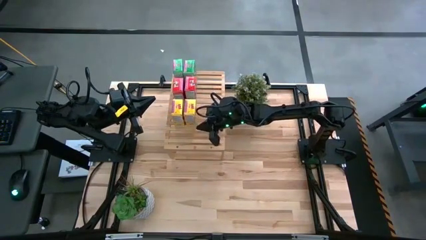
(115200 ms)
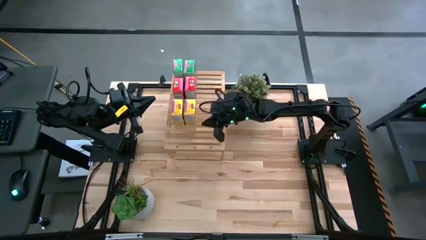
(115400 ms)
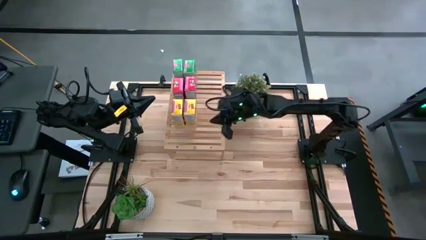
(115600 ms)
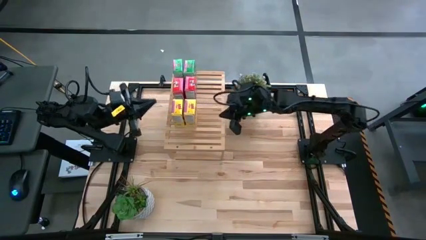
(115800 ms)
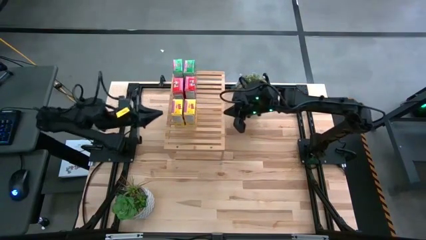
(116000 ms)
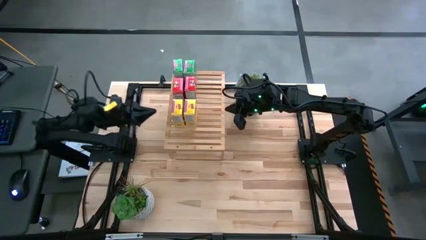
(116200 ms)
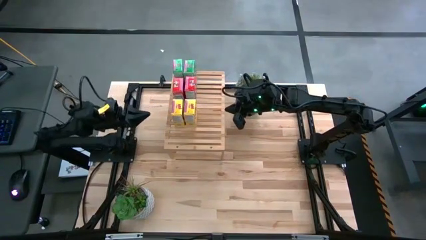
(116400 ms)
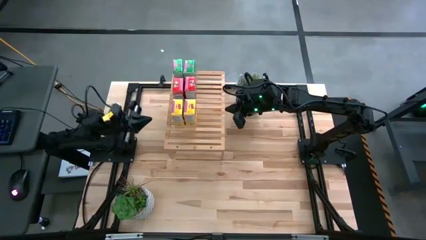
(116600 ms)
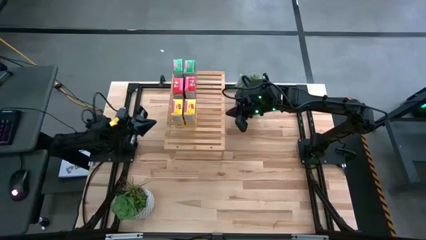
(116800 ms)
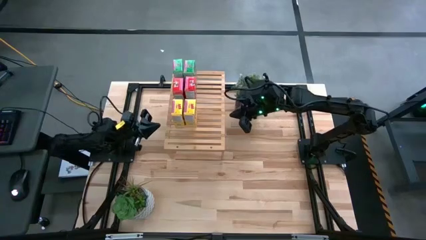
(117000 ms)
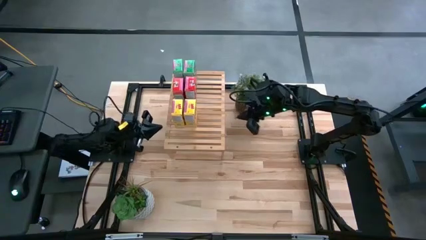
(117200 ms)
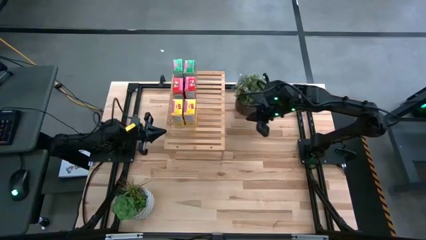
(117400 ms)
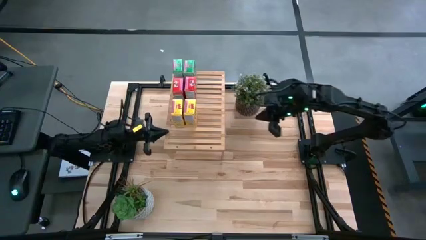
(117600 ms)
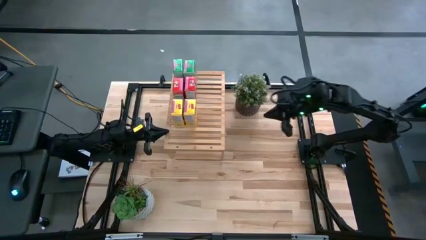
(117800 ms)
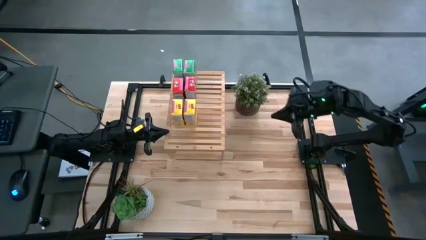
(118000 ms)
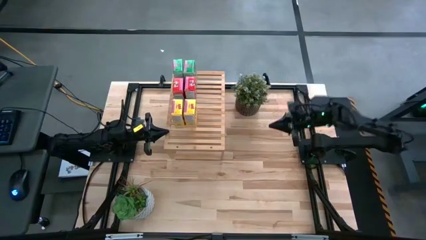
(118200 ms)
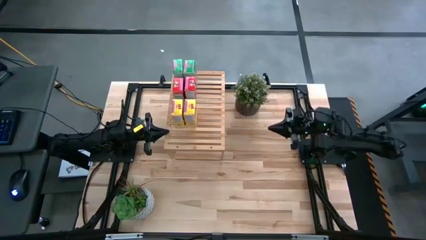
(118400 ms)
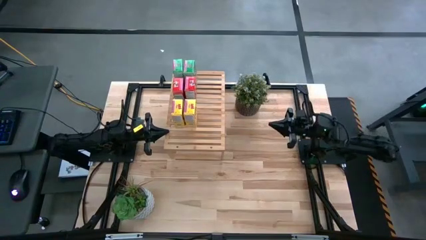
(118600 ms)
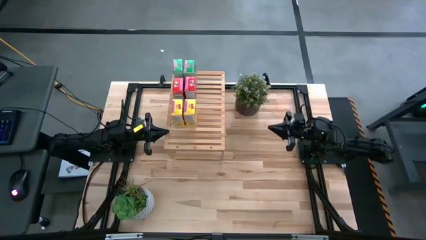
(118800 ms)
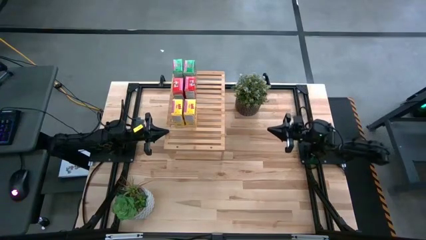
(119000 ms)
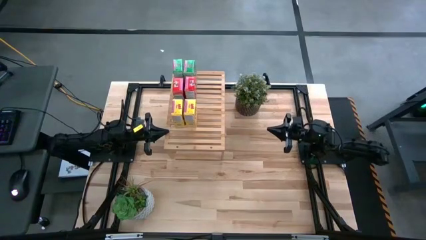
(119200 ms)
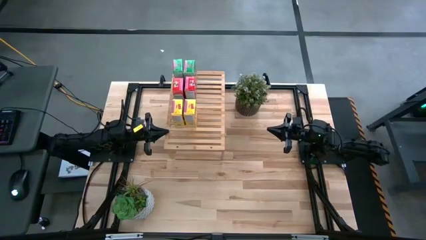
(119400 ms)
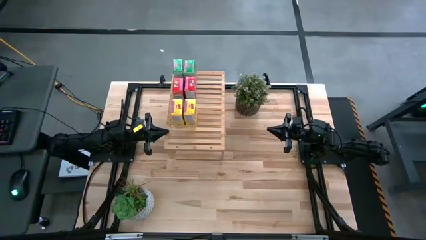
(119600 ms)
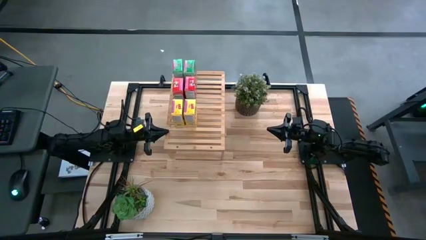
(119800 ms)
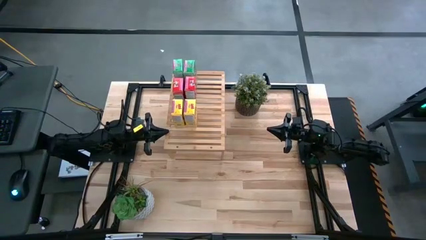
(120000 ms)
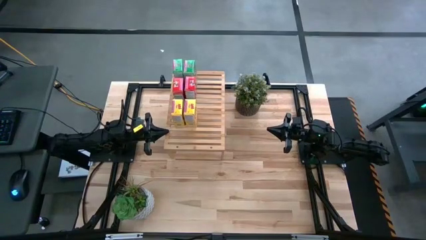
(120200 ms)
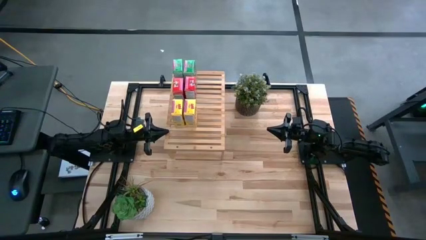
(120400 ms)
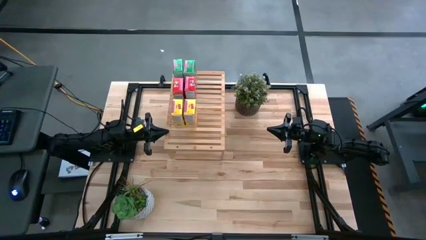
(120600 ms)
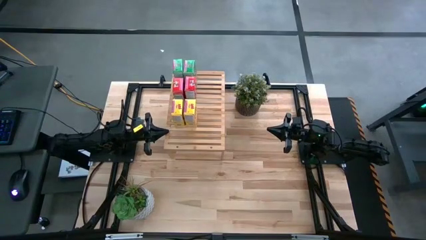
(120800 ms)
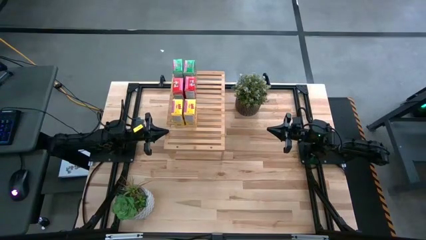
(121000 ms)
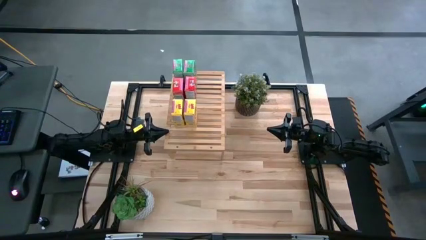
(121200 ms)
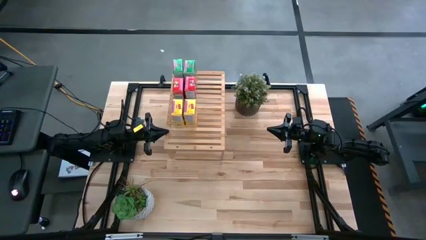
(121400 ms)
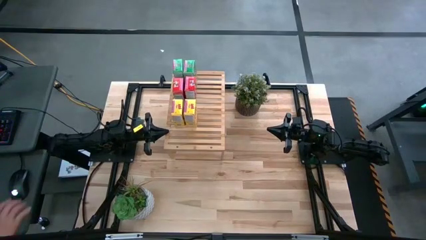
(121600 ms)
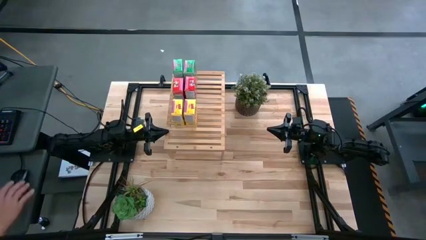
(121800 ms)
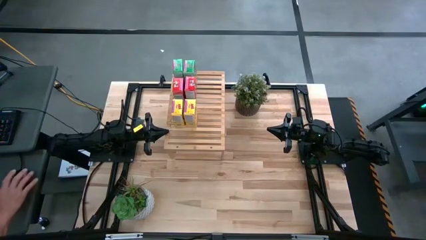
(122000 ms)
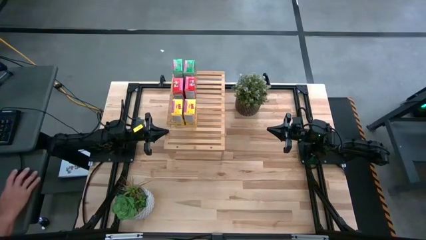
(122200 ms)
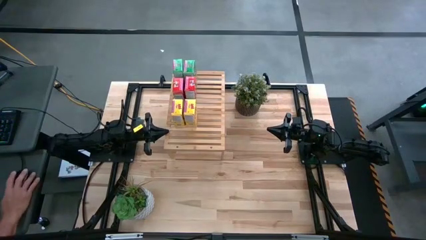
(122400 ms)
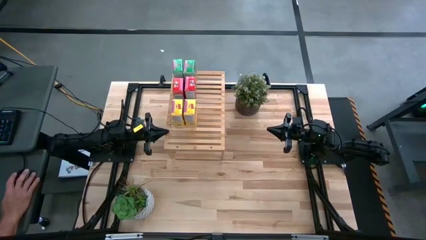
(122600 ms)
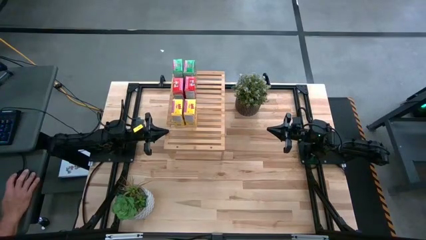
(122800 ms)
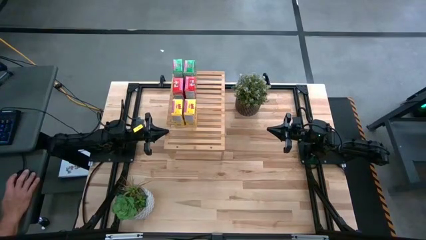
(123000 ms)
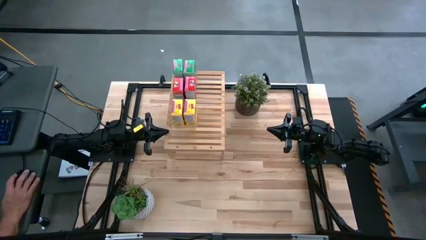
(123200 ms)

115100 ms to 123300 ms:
Task: Stack cereal on shelf
Return to Home Position

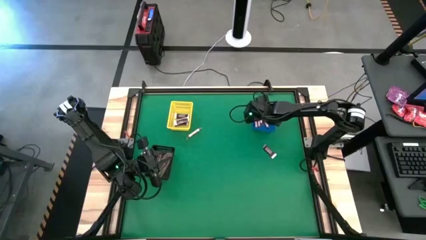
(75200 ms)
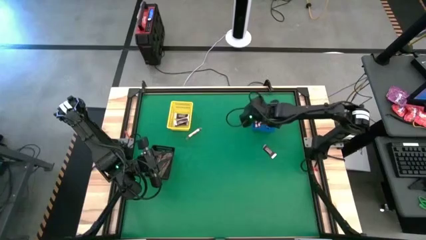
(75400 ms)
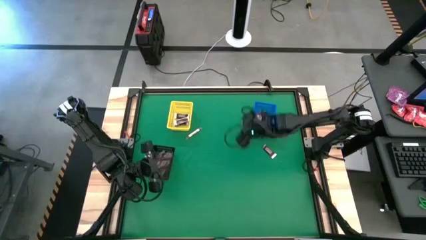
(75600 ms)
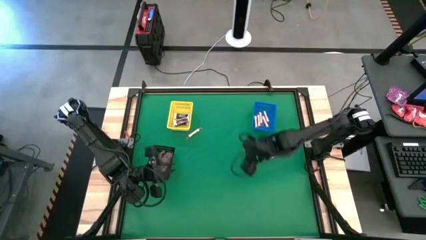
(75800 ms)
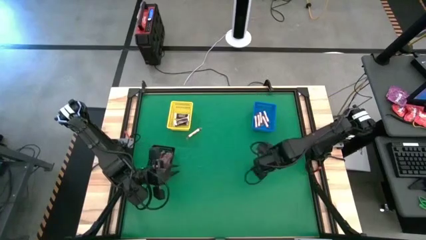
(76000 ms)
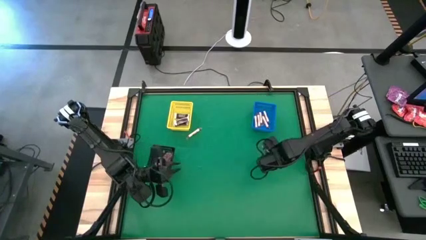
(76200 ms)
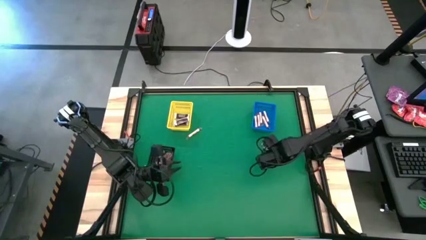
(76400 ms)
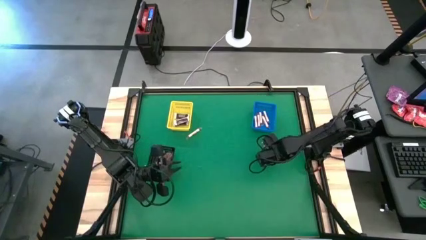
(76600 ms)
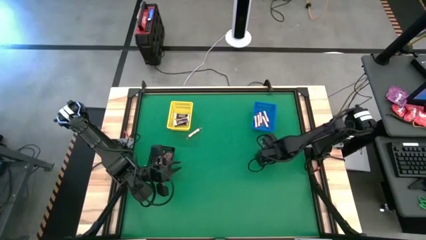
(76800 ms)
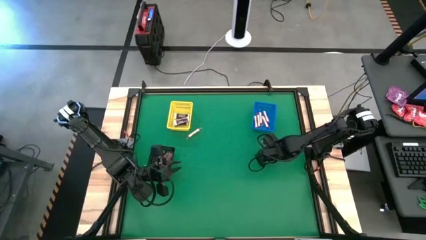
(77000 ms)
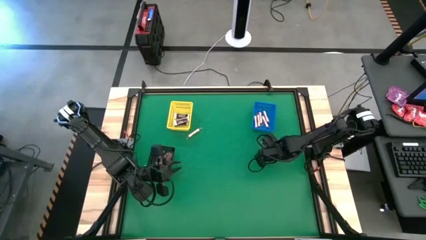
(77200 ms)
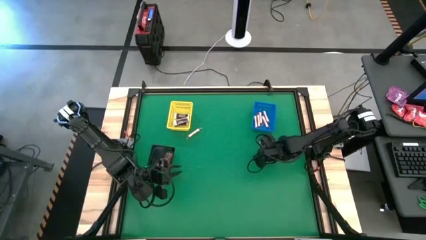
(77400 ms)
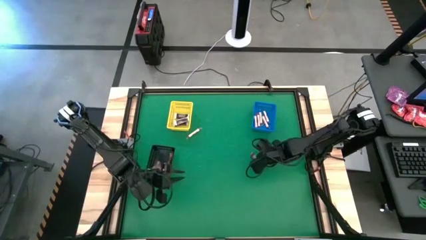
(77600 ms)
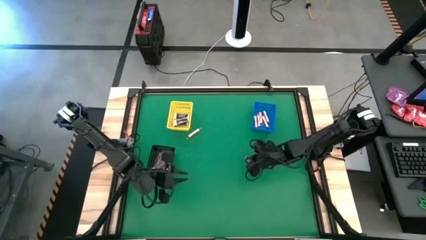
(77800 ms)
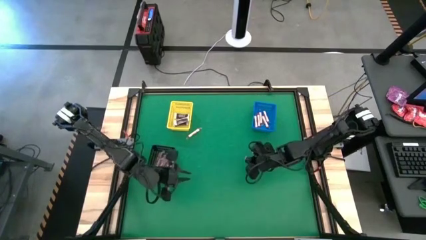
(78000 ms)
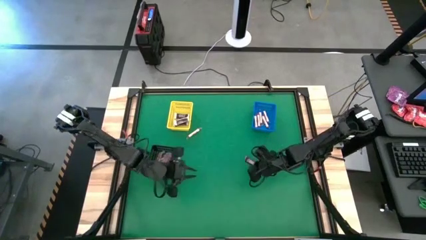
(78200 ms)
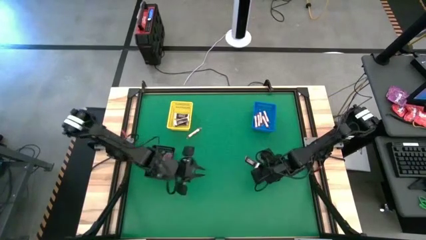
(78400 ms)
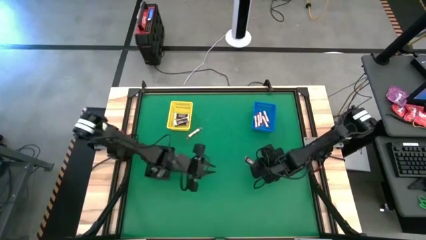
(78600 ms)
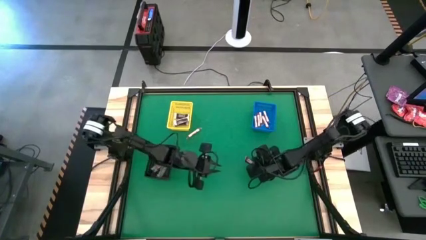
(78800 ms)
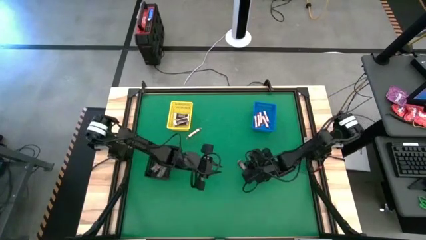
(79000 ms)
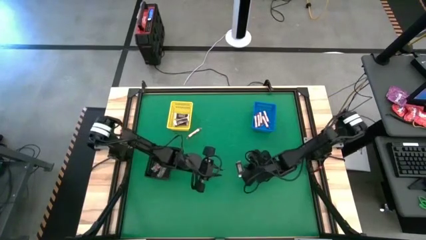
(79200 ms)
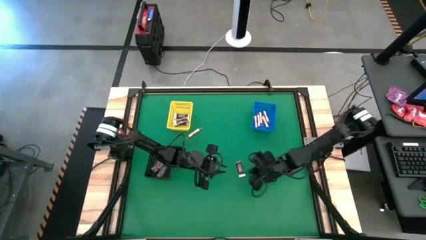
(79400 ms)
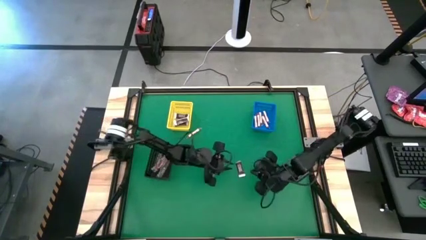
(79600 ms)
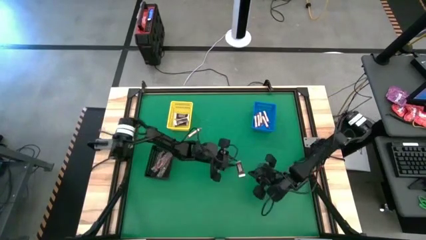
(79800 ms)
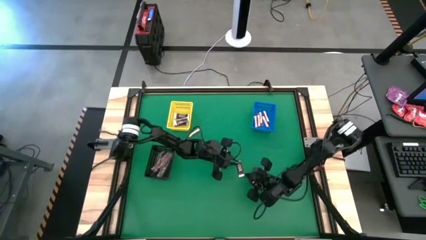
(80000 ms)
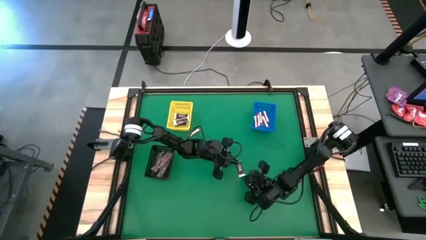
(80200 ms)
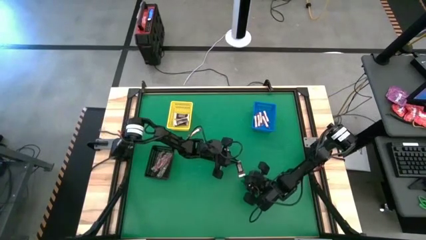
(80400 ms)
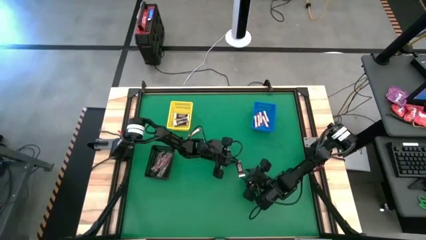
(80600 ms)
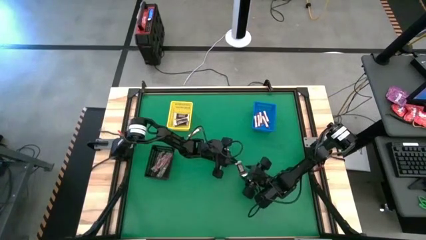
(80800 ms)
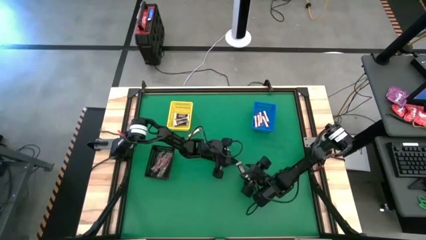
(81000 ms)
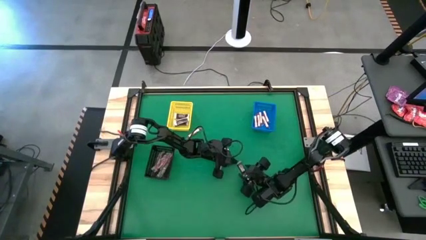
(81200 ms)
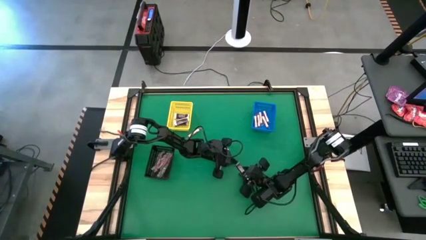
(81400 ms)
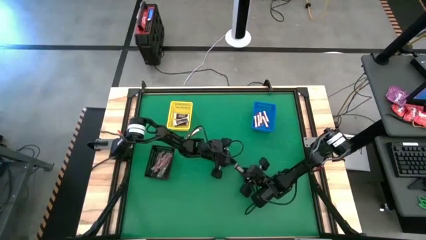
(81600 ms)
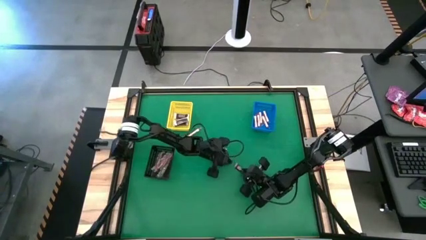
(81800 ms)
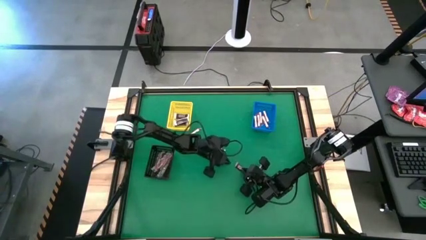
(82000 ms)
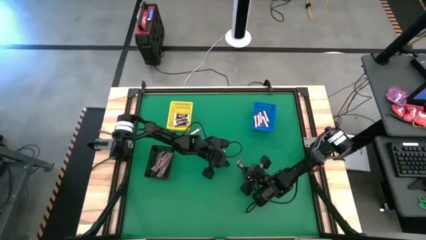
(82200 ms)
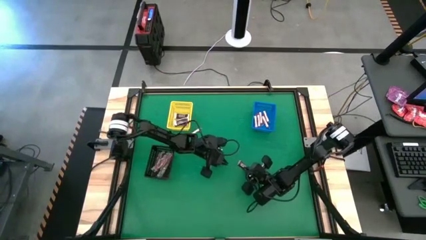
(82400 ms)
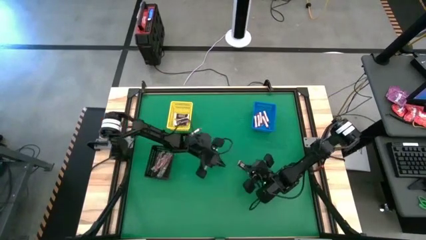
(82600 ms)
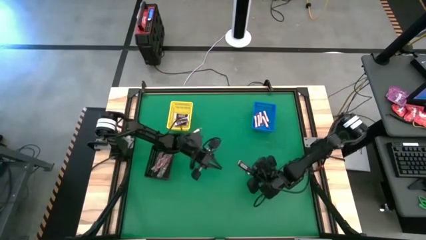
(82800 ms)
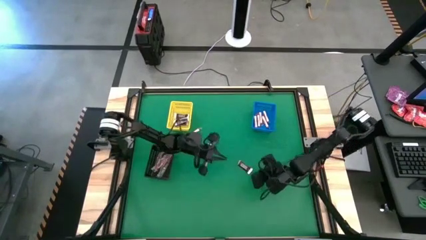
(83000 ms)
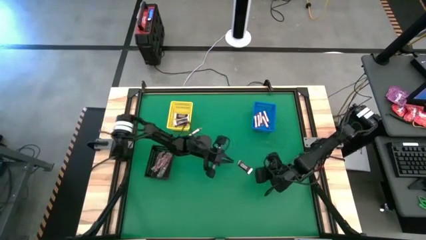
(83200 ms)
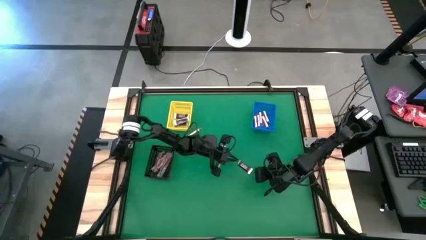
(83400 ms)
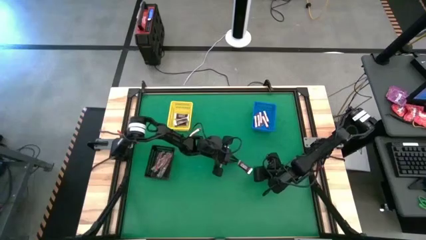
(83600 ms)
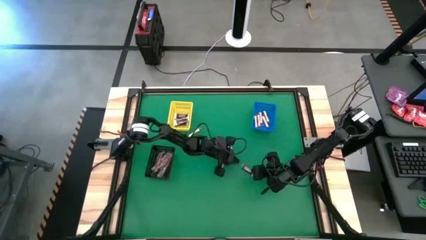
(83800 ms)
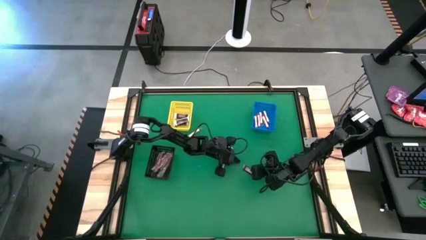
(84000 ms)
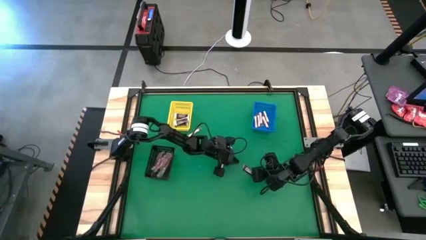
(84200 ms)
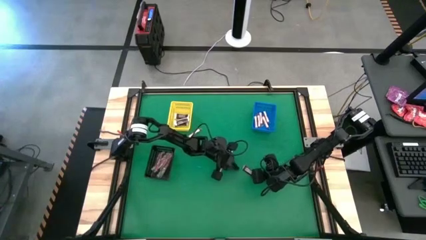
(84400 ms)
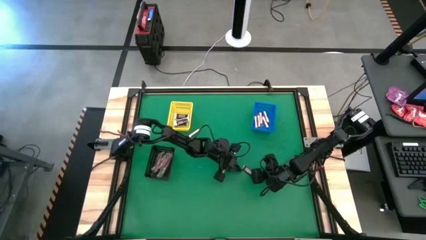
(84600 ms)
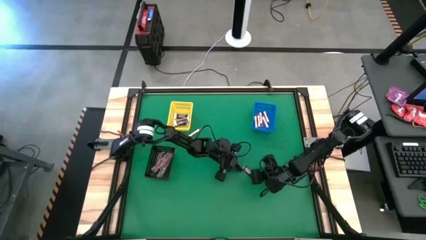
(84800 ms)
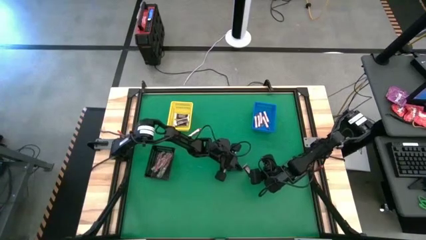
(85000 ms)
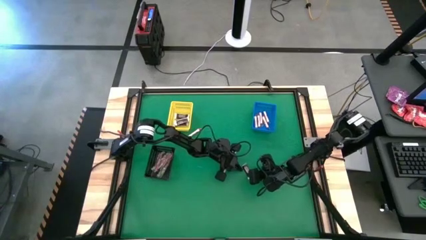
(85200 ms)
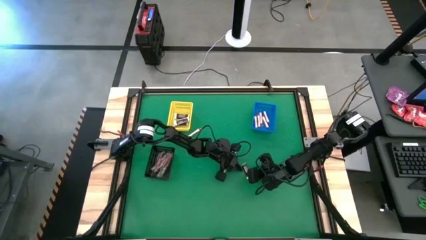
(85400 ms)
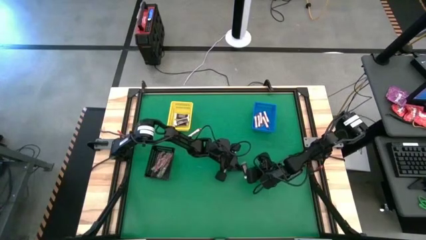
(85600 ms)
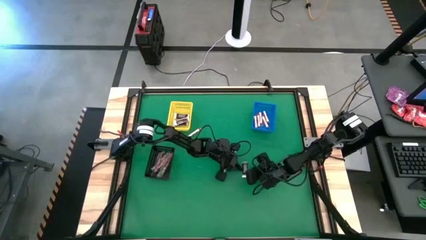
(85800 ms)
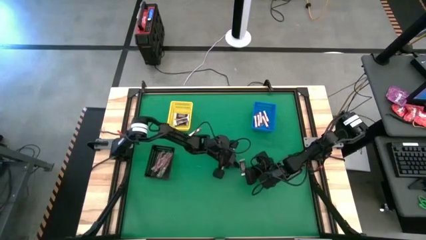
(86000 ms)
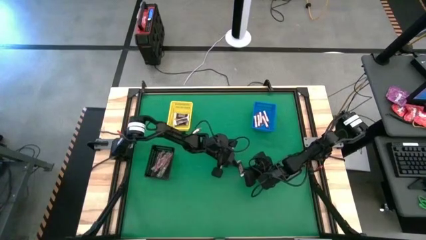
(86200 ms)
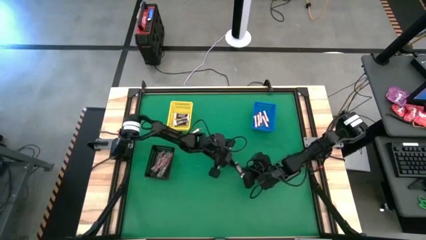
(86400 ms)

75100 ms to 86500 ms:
Task: Sort candy by brand, put in halloween buckets
Put the brown chocolate into the yellow bin
